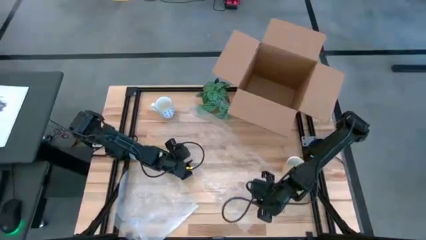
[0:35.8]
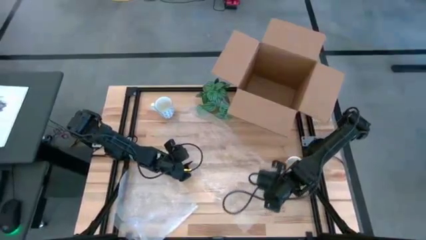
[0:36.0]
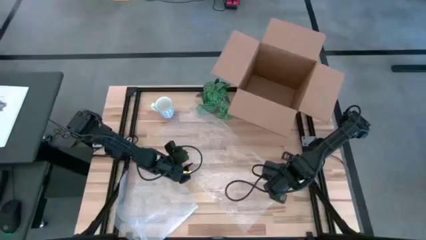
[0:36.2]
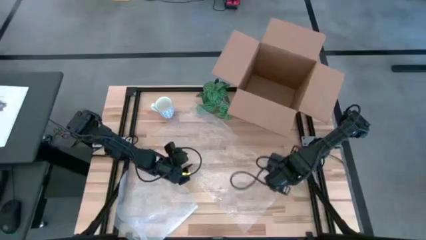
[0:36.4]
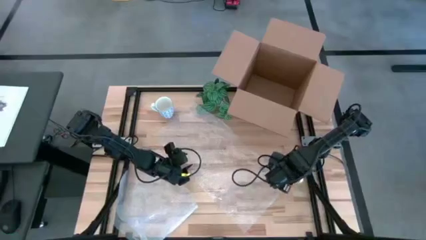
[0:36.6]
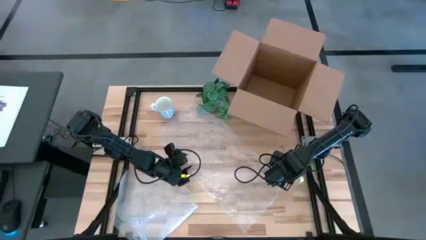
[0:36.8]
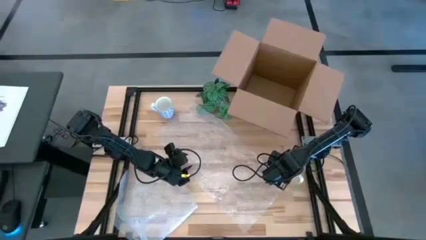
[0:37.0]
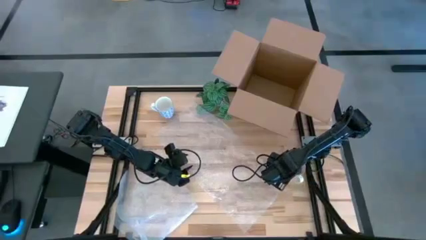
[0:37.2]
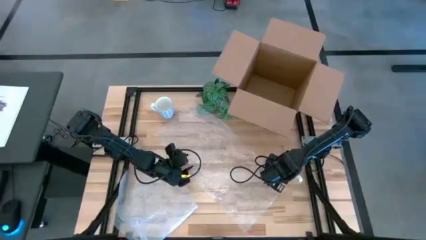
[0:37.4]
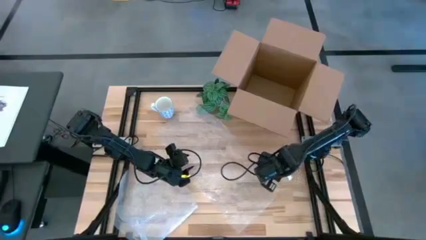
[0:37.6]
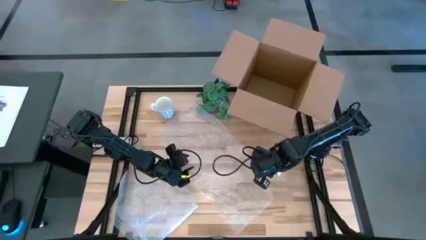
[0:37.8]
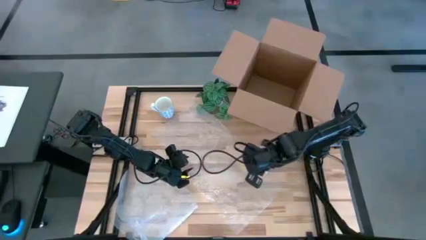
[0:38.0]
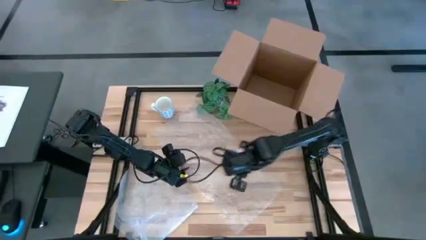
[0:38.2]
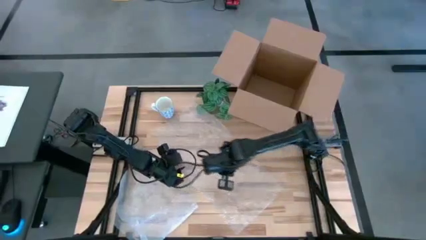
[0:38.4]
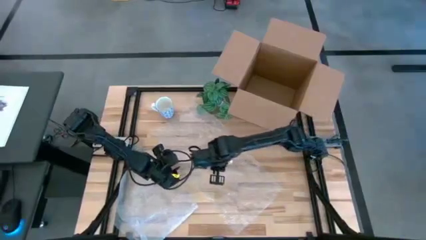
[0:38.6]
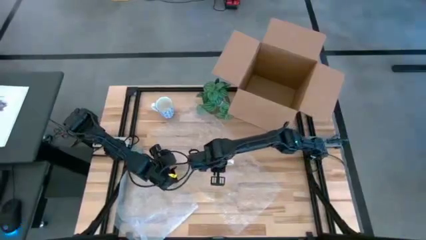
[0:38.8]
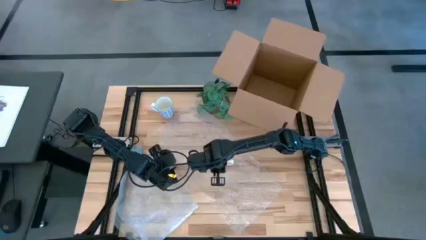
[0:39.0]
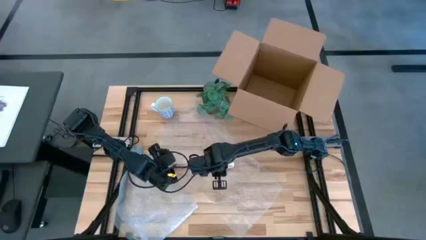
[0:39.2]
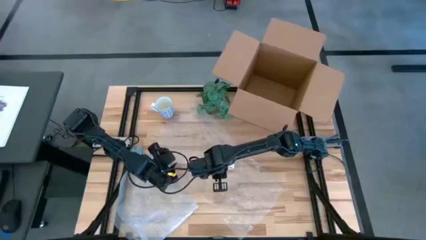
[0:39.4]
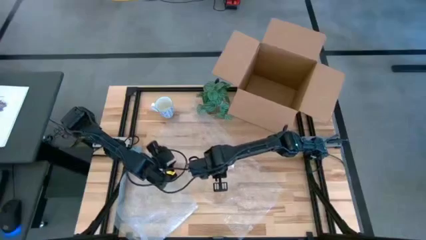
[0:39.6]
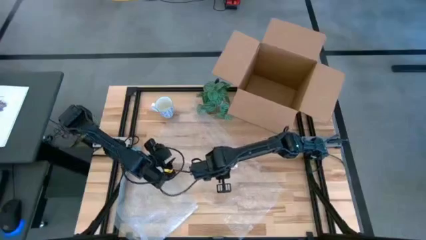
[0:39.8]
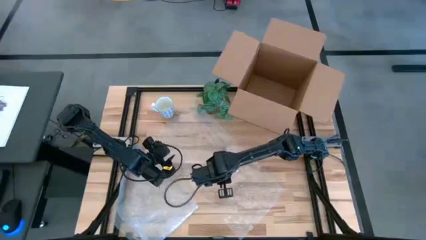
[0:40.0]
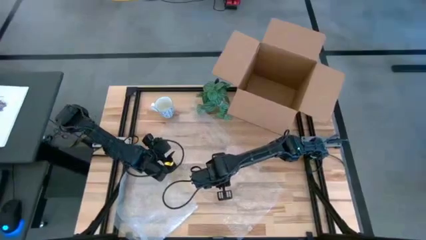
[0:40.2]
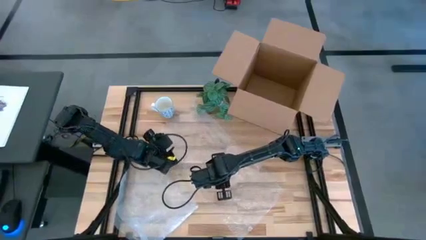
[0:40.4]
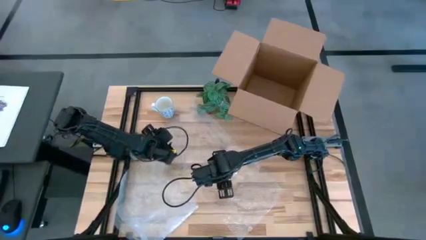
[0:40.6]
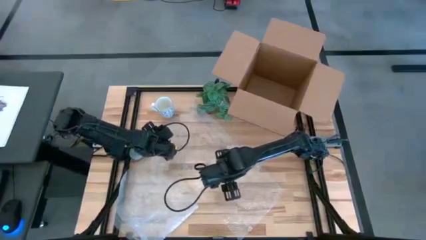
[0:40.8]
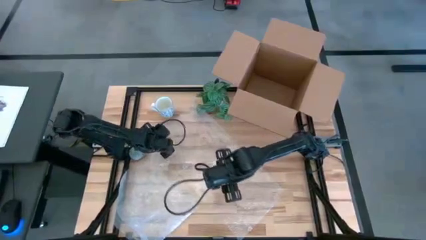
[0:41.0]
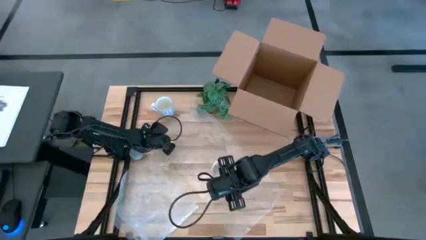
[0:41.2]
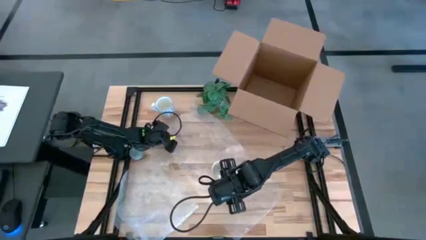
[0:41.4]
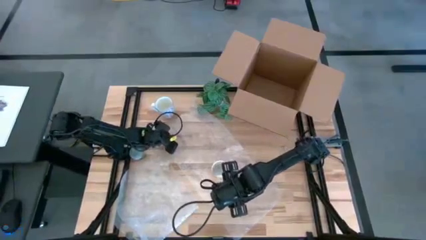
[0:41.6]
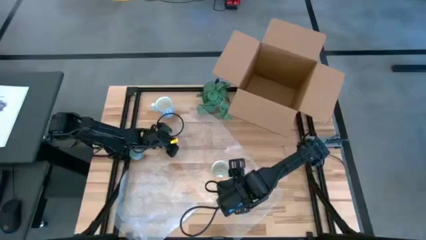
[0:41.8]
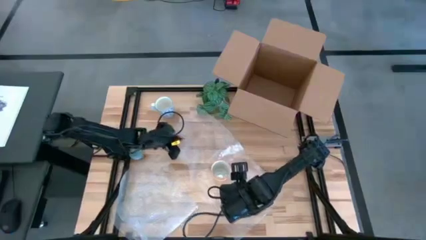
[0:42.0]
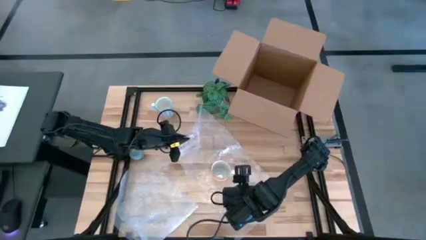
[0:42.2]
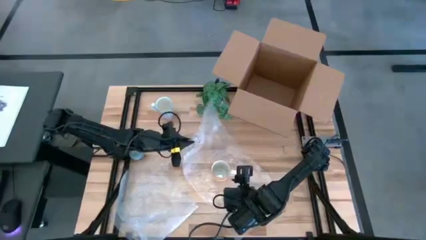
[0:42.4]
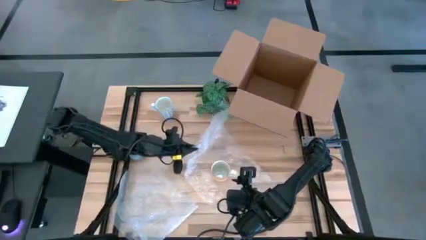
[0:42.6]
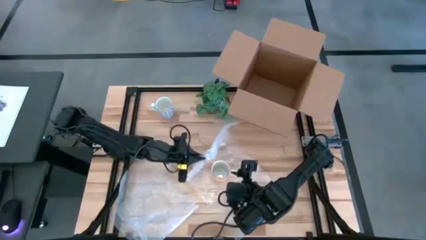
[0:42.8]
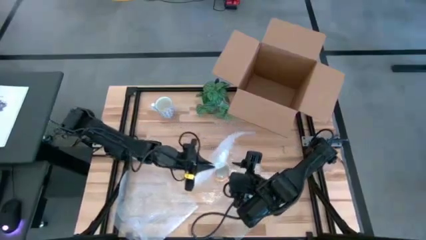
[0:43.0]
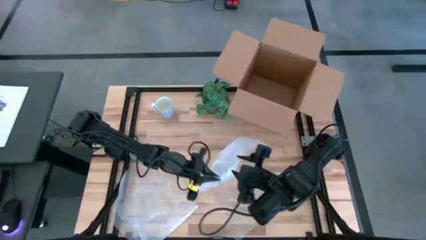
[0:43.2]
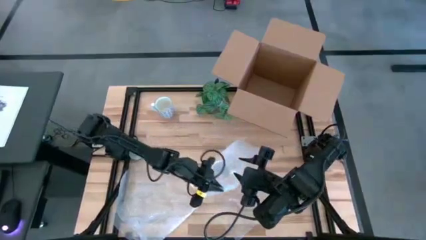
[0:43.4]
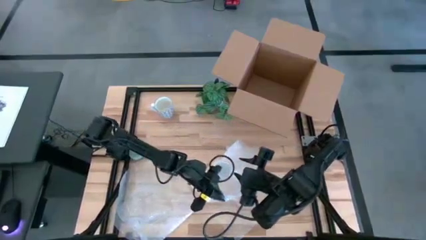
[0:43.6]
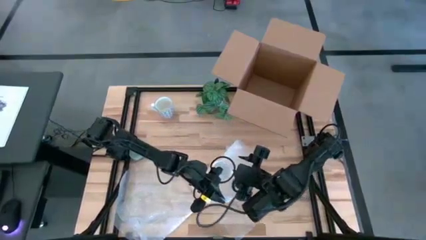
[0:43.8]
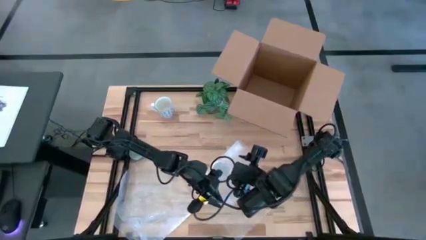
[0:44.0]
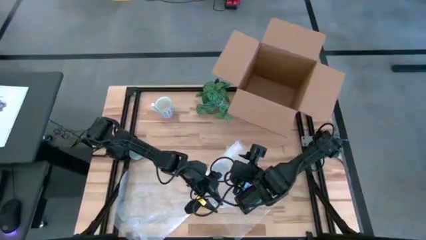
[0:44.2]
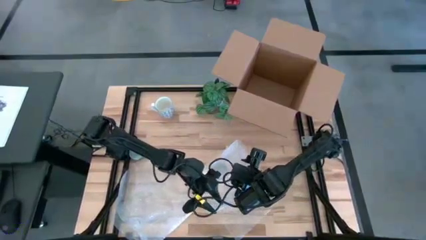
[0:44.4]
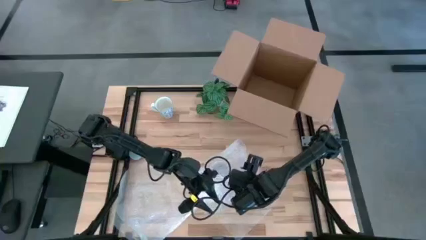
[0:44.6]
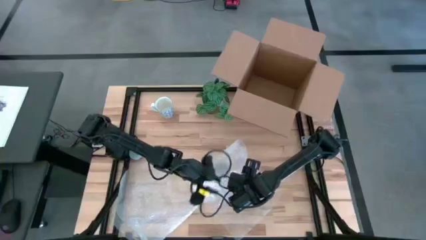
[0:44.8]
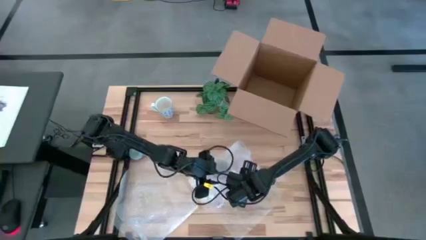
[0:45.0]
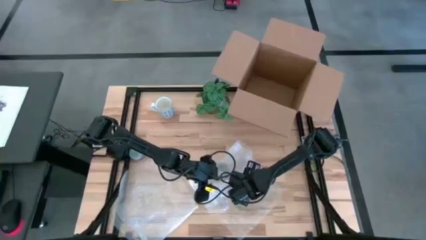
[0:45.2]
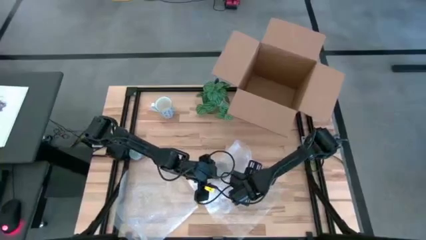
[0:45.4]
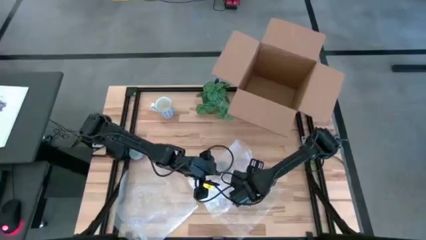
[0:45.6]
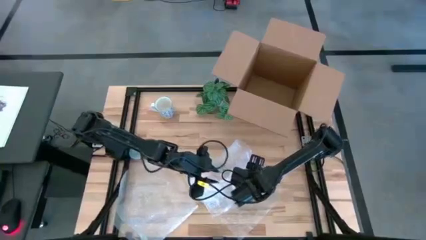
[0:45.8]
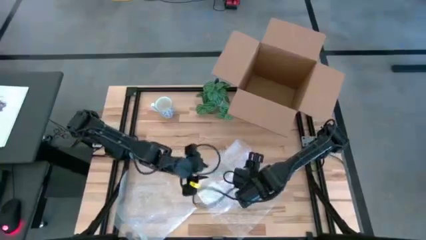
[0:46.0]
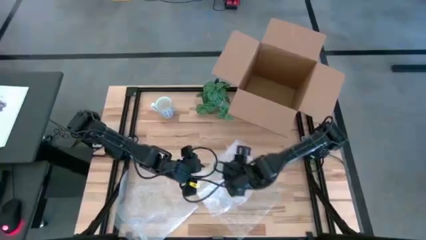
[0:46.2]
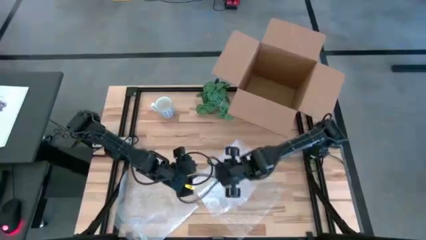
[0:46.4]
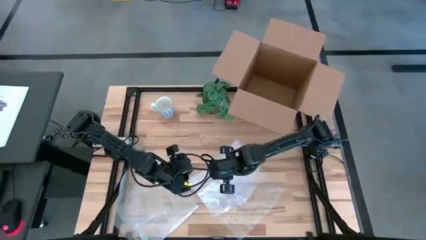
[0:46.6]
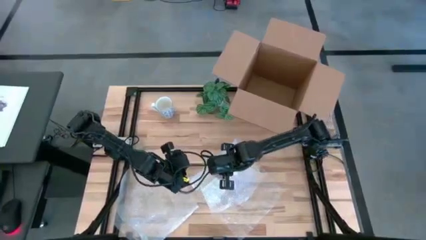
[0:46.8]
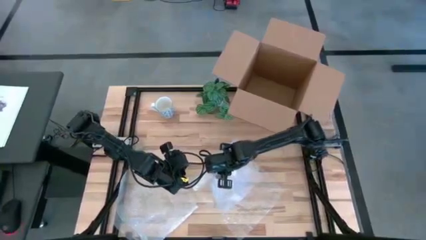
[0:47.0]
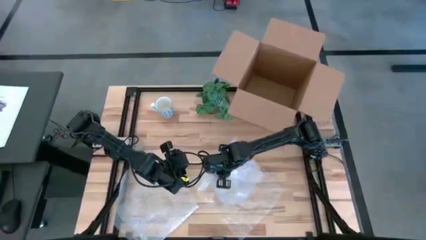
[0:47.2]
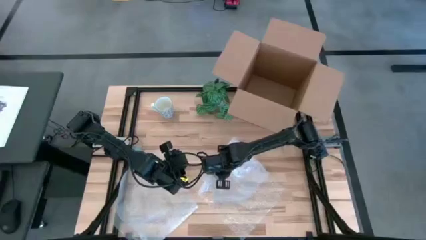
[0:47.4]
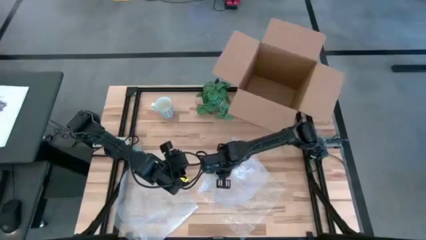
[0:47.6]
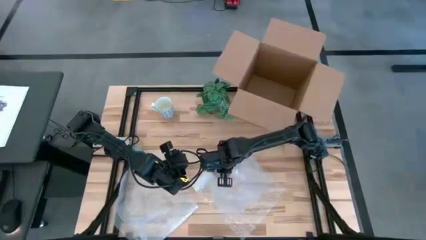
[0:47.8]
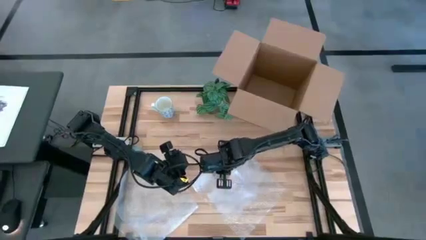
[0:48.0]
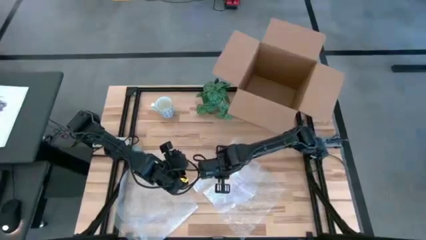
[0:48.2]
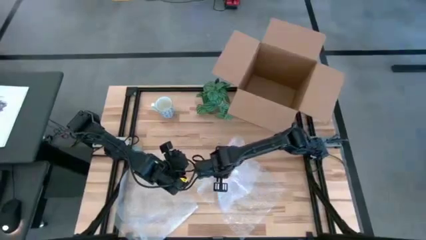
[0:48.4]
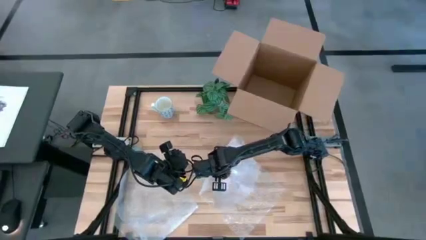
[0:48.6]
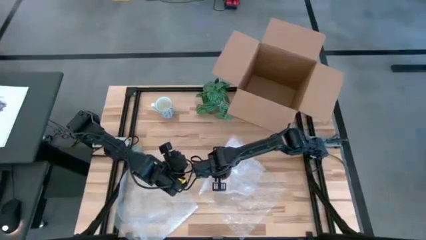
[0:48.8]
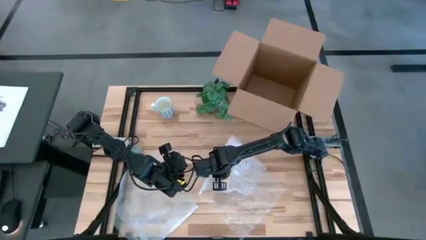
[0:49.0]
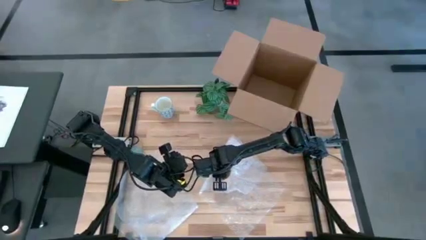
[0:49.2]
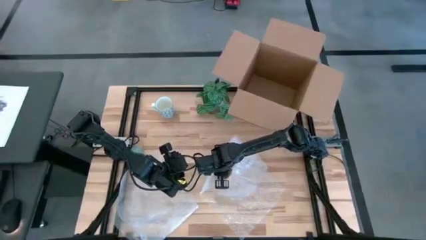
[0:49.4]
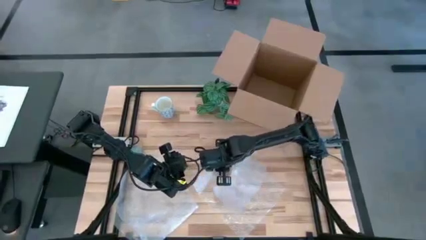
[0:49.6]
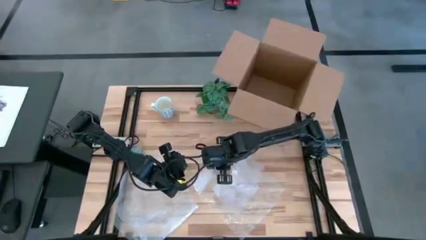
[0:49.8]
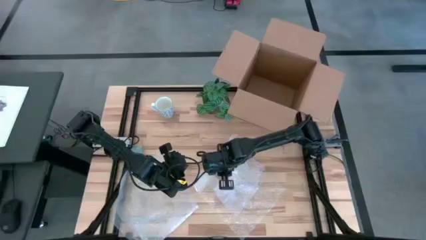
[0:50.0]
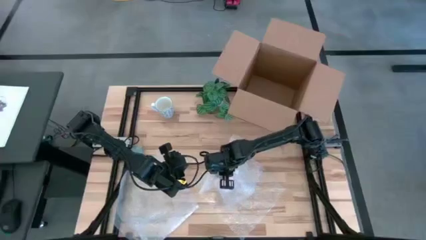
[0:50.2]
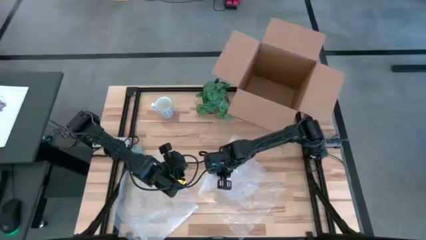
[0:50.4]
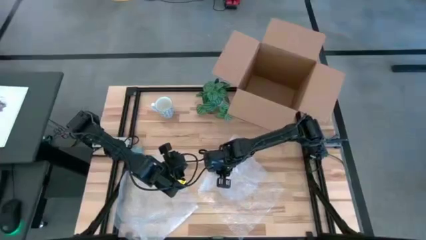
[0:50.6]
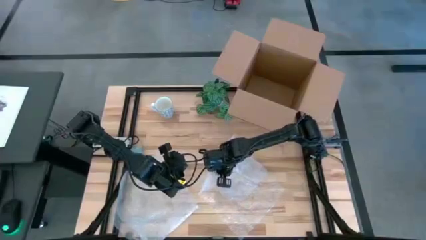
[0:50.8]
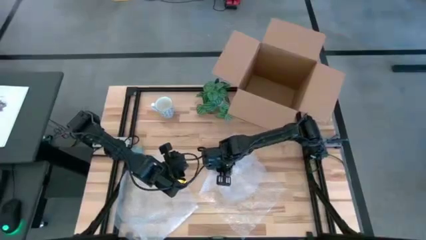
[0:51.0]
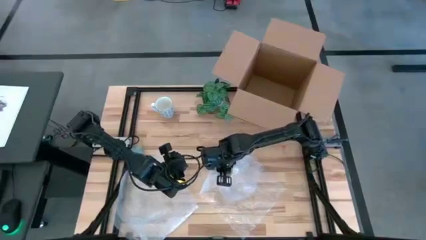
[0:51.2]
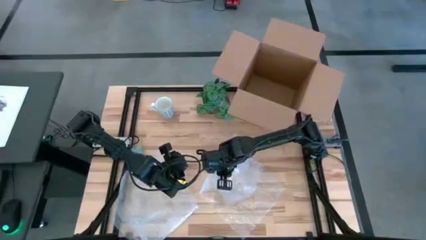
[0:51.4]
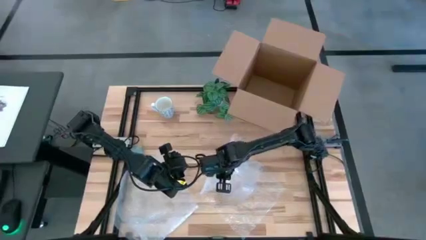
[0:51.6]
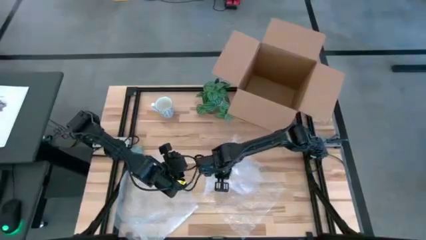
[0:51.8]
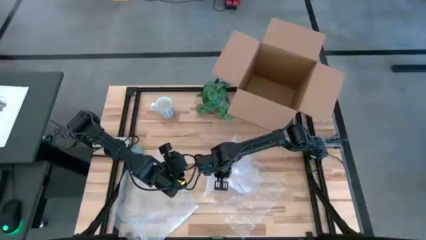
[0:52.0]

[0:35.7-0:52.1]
Task: wrap mug
Wrap the yellow mug
